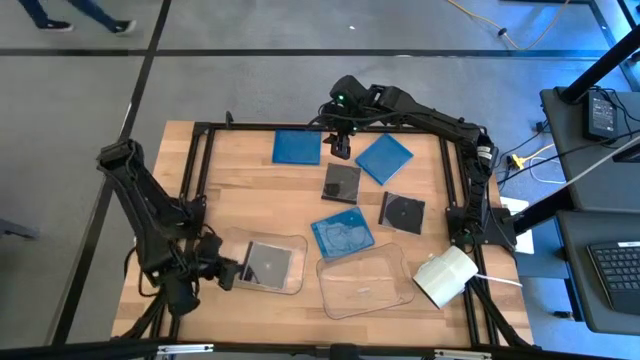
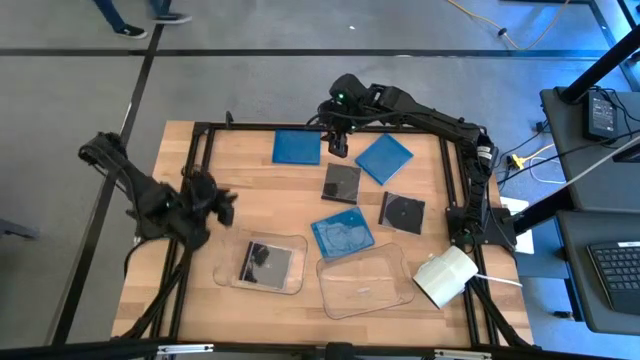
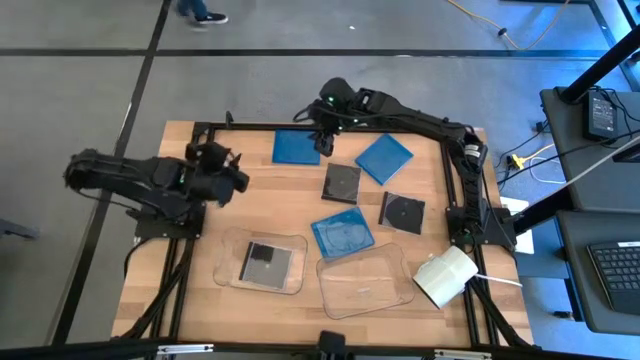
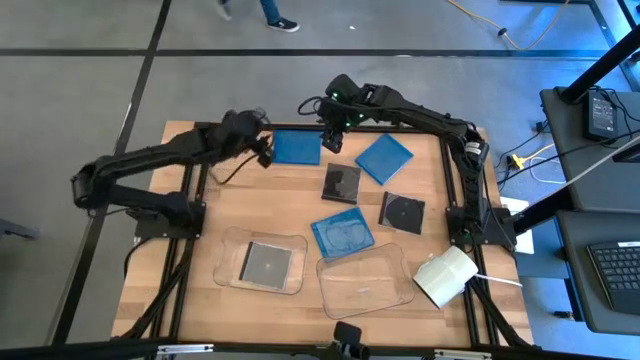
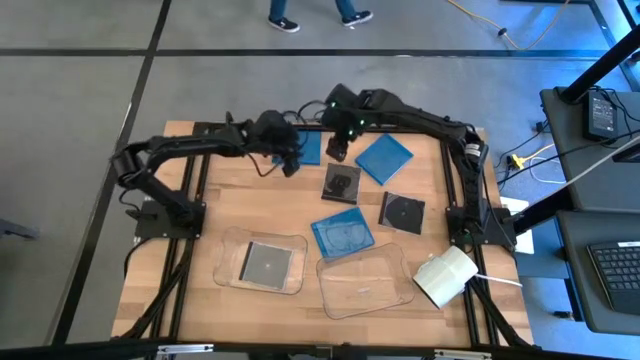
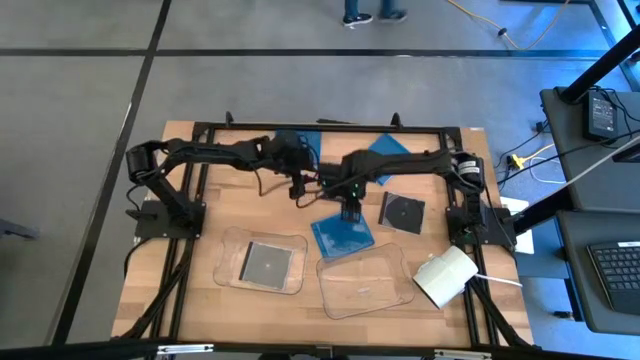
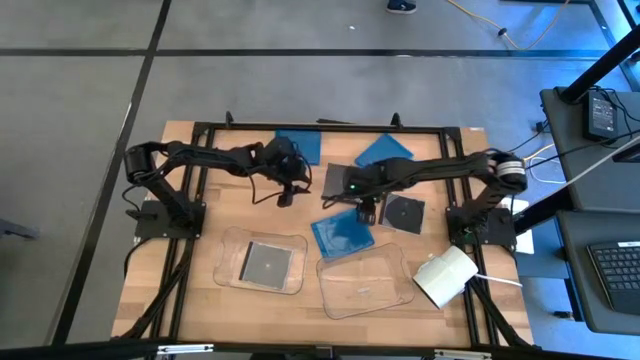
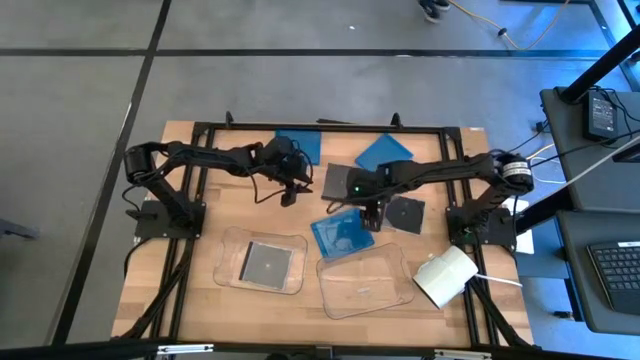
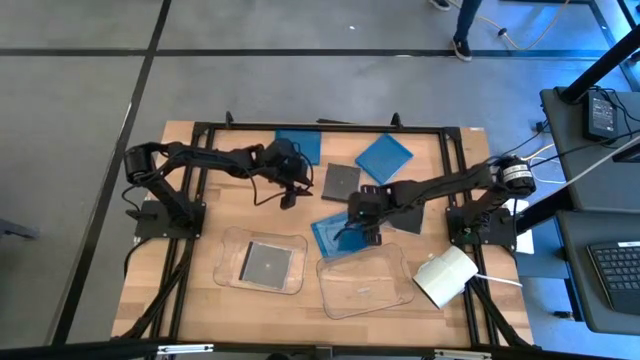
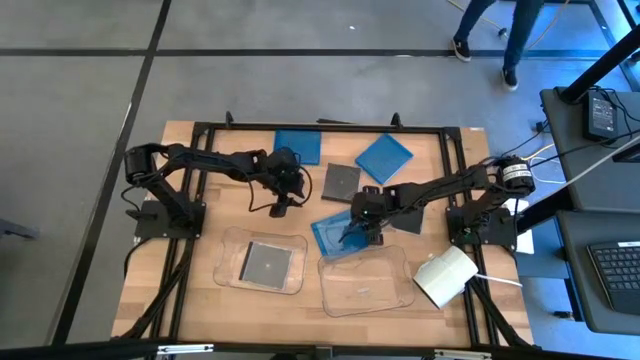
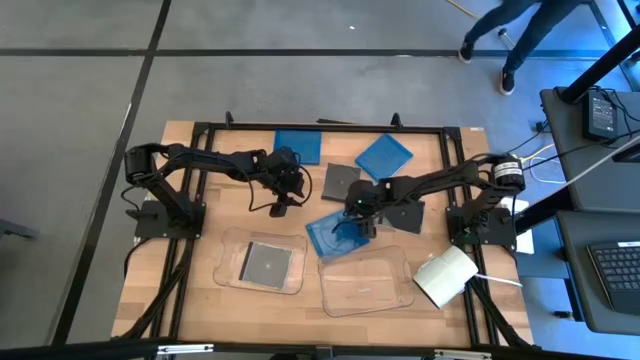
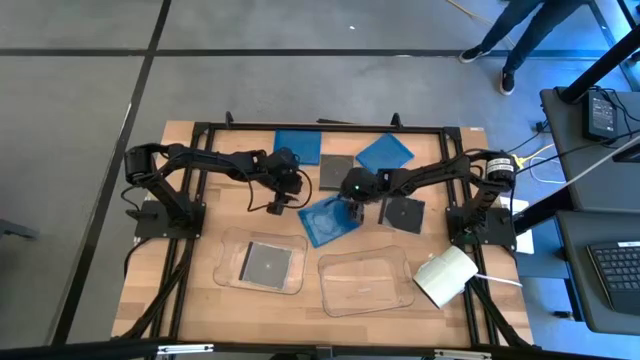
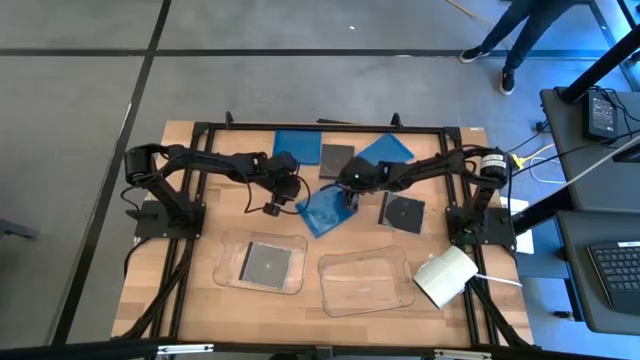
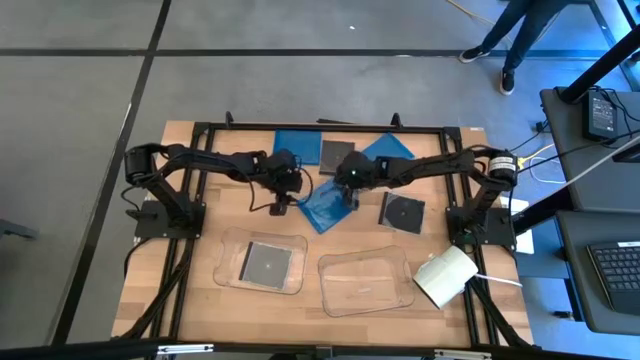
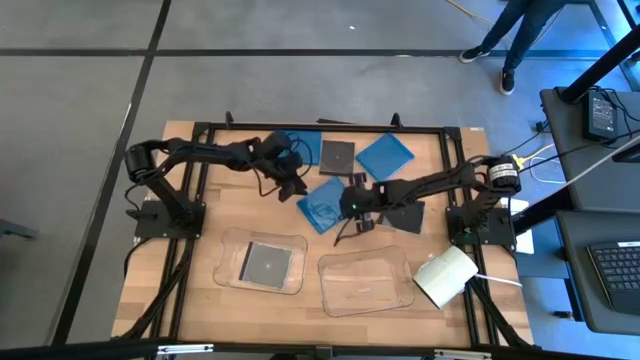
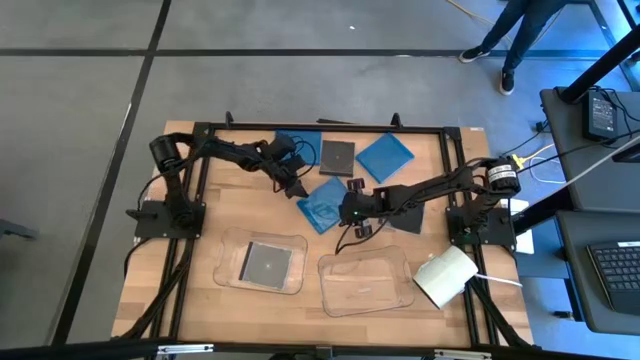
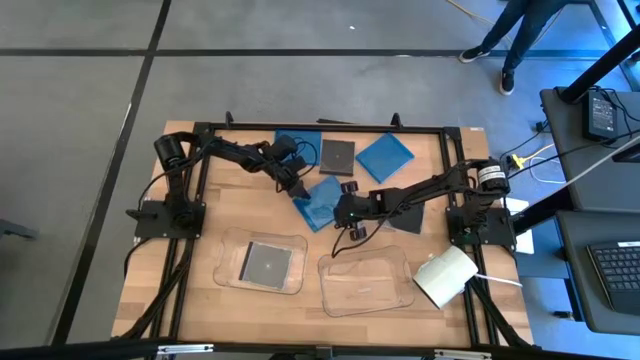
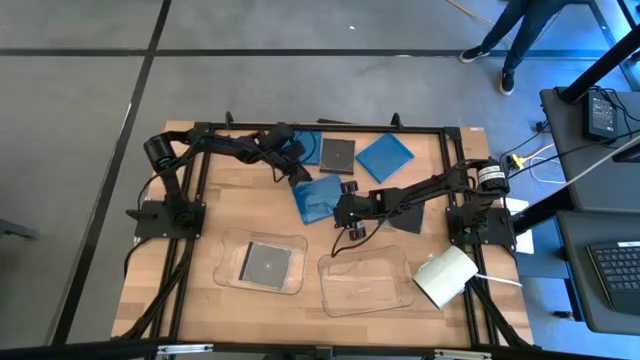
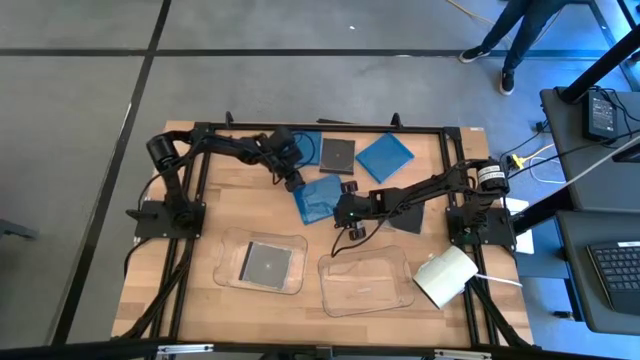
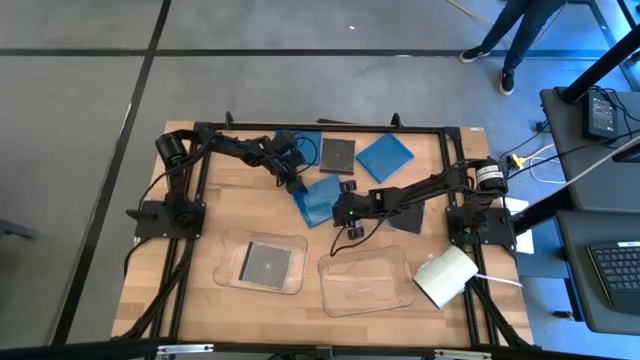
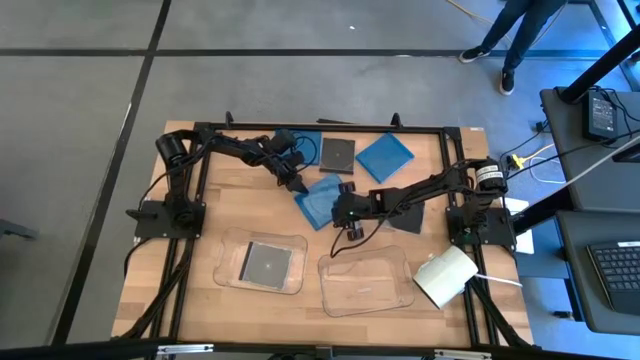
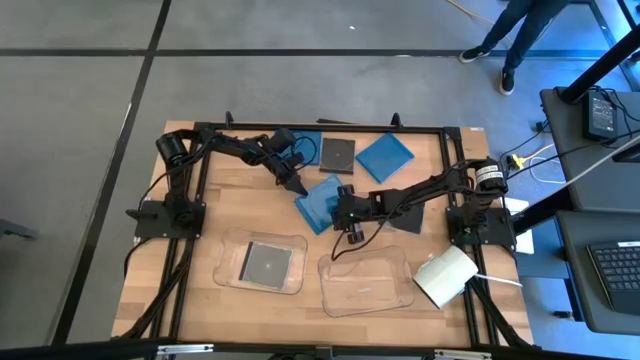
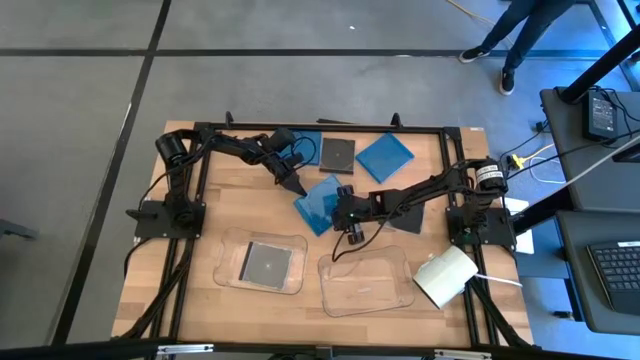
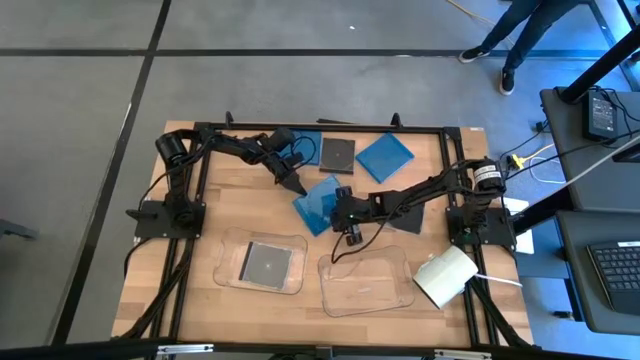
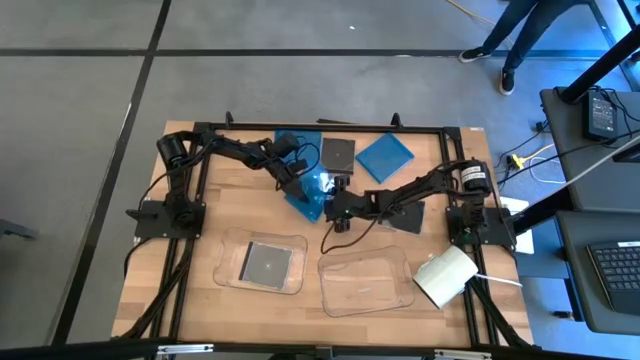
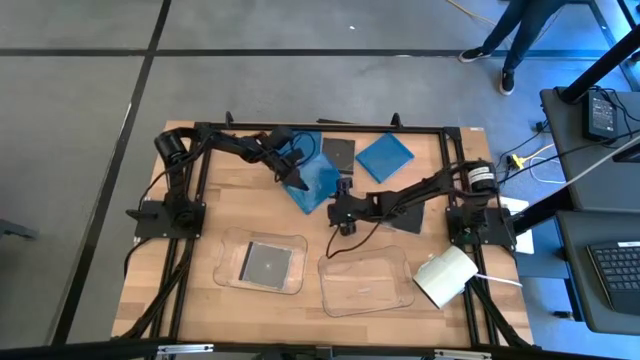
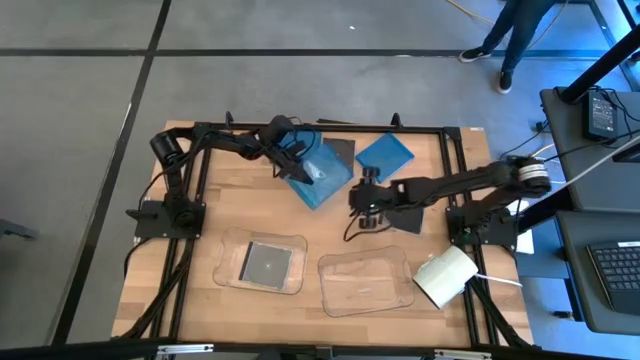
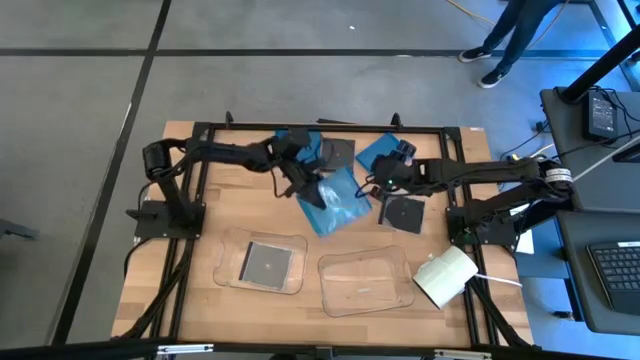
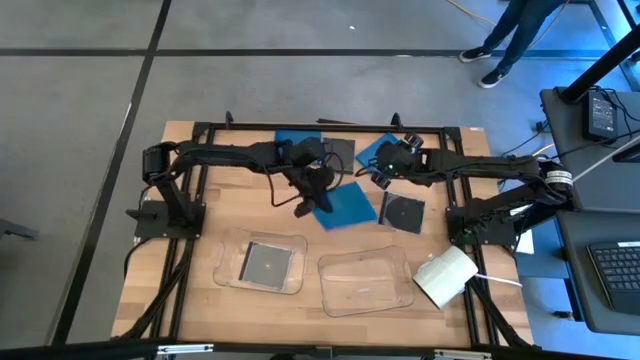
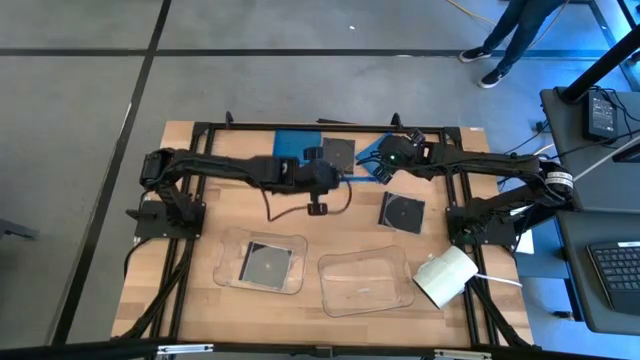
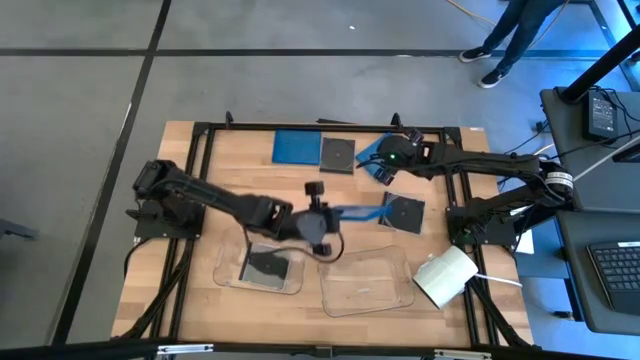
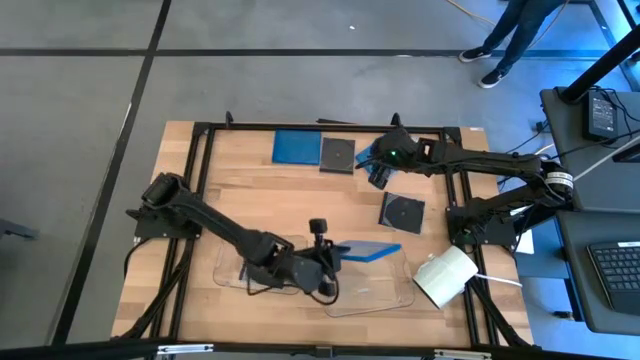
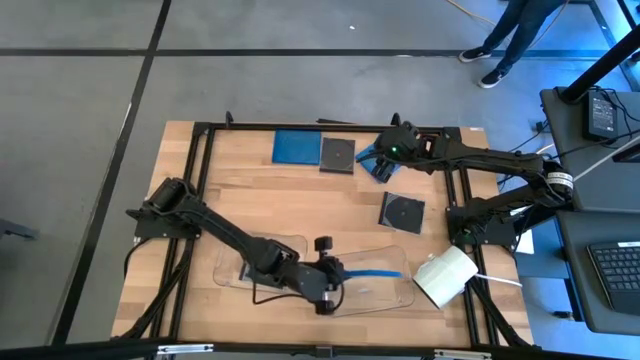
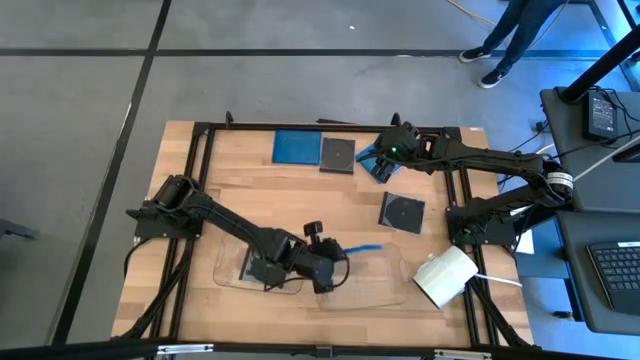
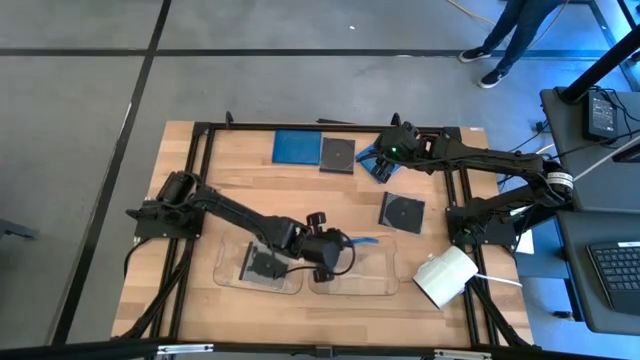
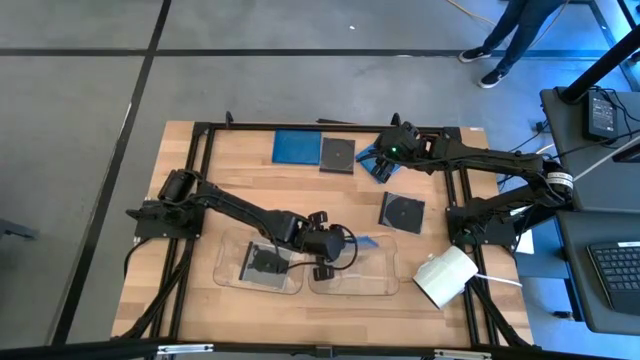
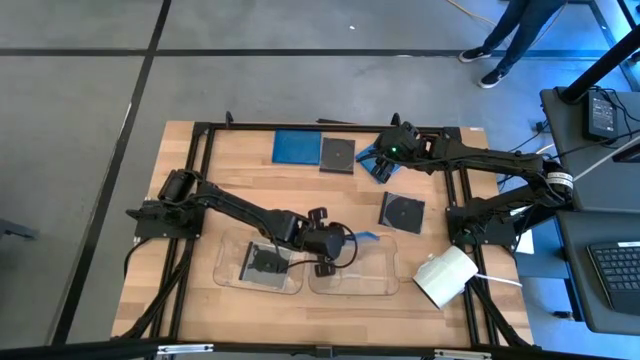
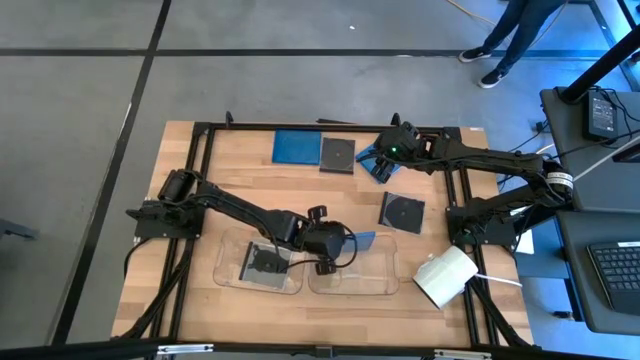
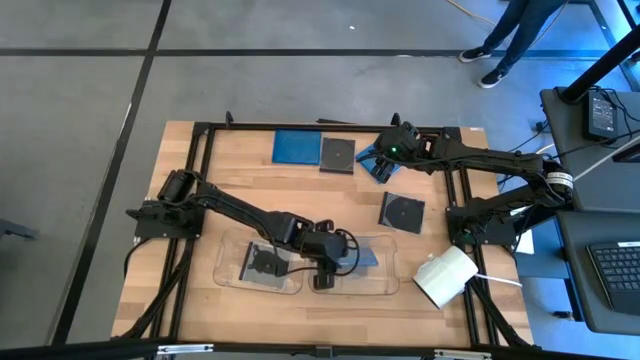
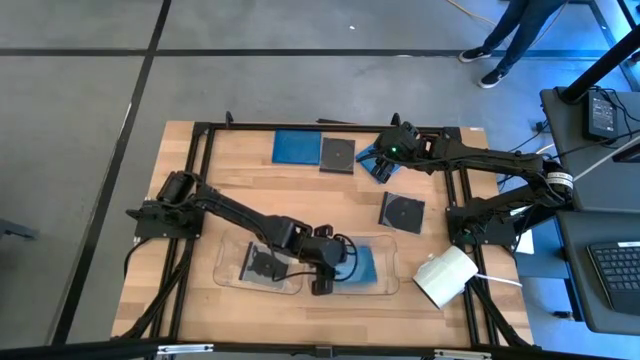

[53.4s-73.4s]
Task: Pick & place jewel cases by type
Put the bottom blue CD case into the right transparent bin
